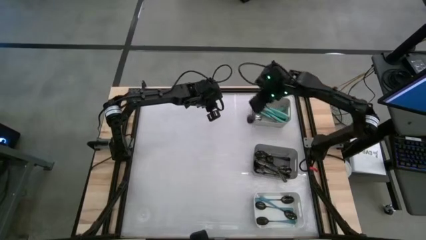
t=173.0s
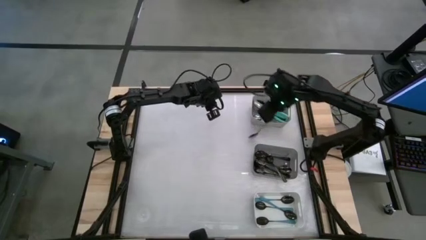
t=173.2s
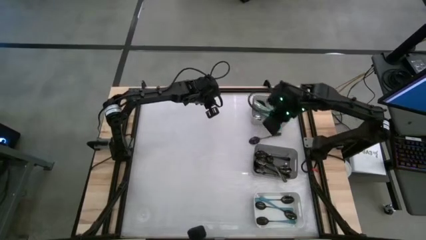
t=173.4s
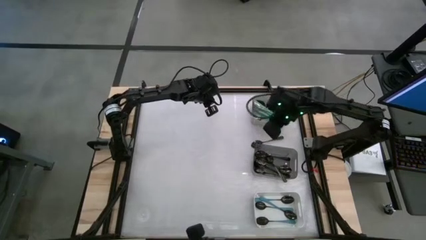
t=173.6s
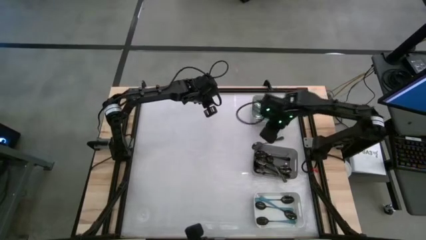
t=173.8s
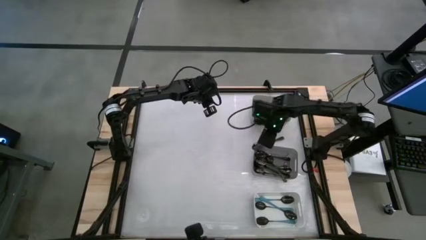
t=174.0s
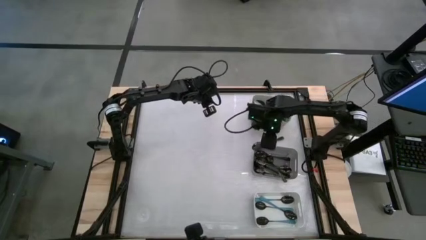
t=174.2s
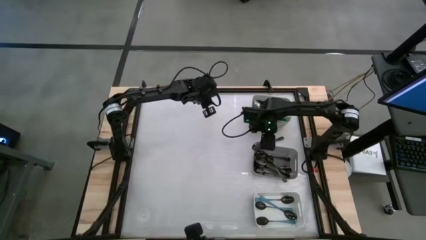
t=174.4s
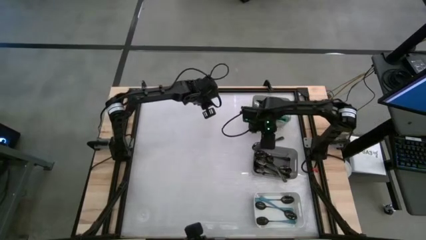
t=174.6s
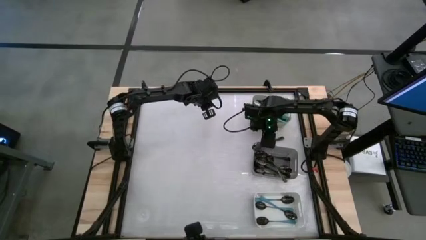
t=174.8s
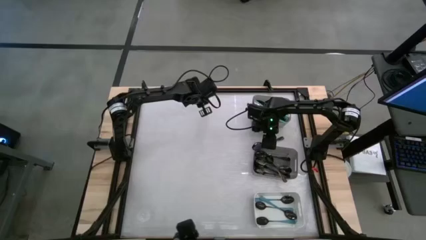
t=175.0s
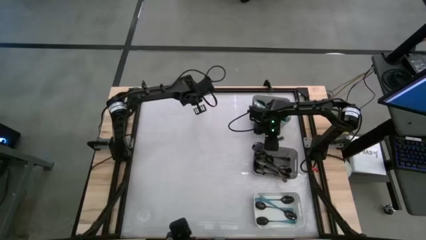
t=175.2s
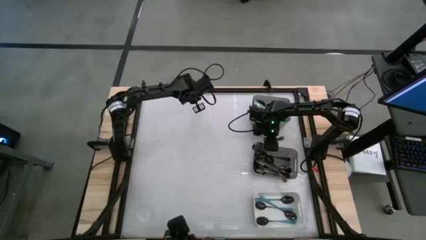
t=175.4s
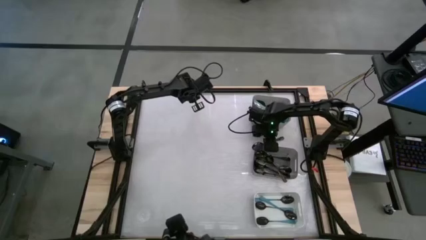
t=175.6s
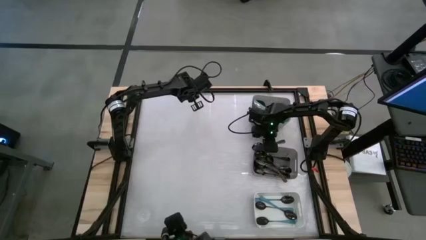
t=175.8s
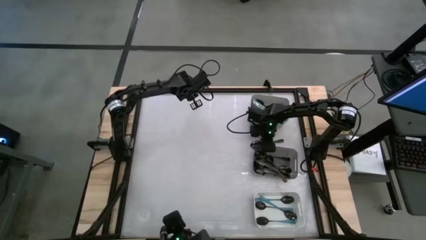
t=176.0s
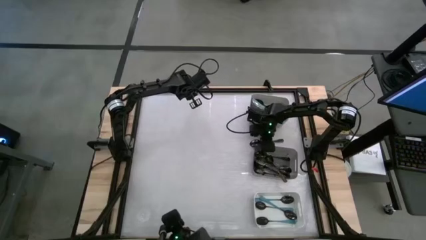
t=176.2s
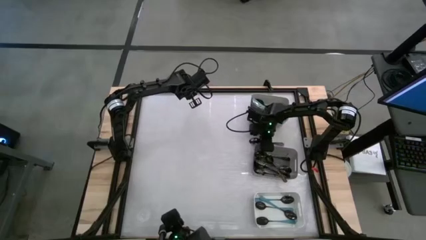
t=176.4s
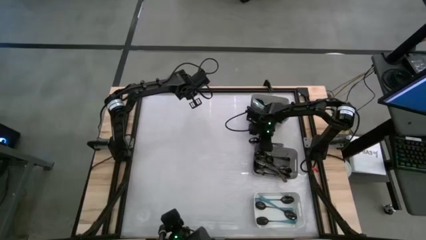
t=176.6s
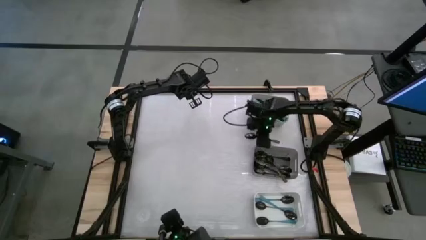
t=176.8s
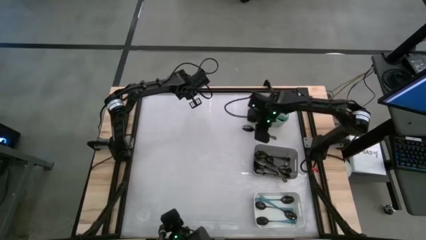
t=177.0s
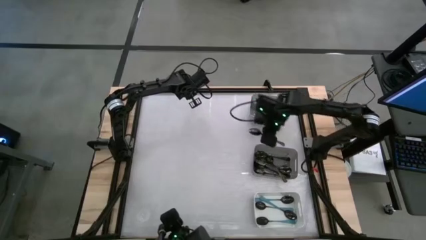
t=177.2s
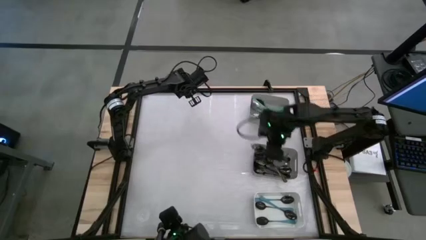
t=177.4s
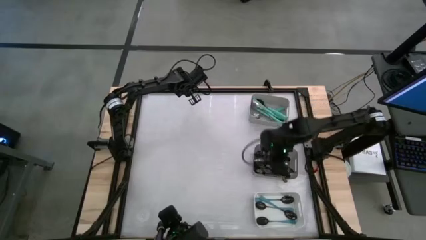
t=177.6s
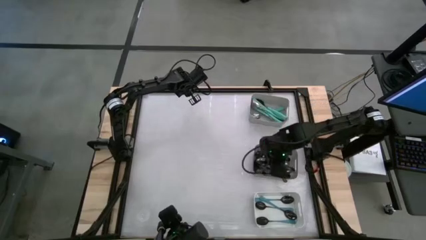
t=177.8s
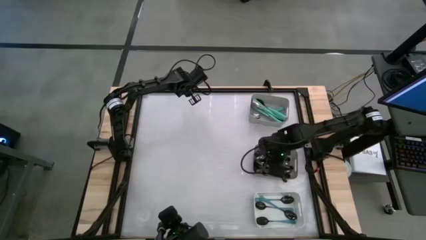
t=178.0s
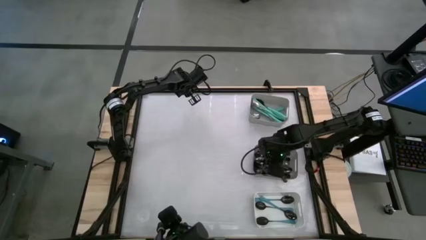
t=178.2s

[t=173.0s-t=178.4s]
Task: Sort silverware by color (type)
Put the black spoon into the black bin

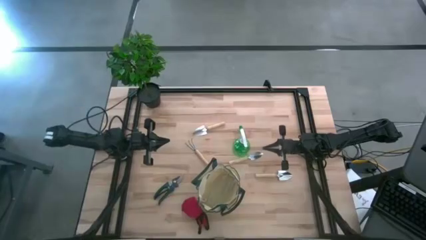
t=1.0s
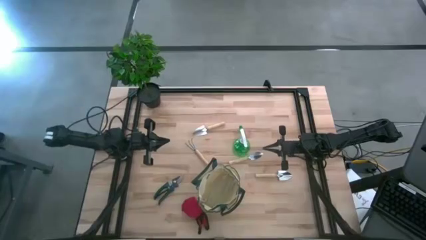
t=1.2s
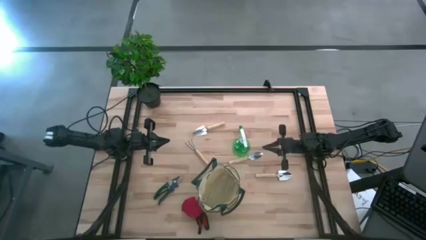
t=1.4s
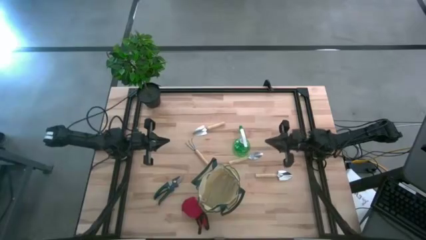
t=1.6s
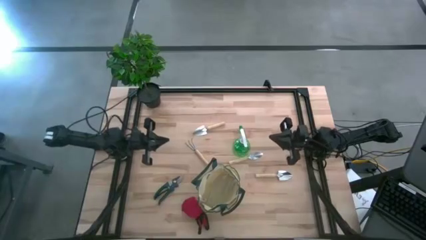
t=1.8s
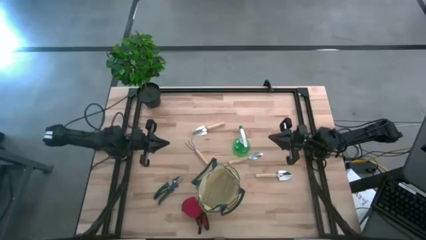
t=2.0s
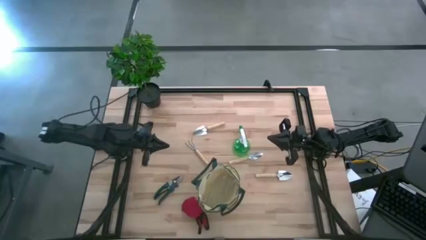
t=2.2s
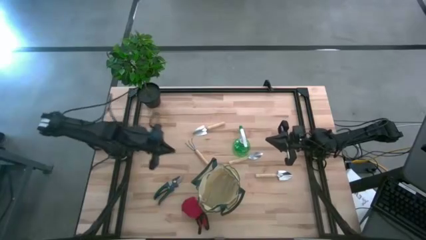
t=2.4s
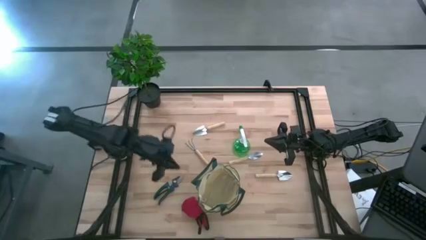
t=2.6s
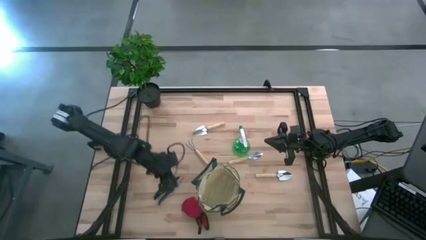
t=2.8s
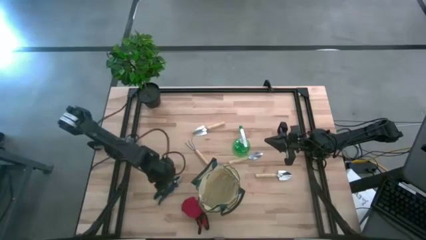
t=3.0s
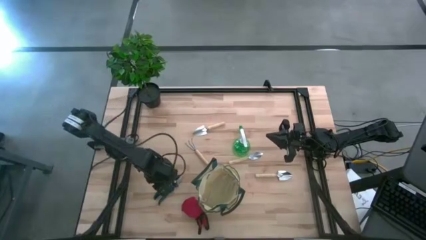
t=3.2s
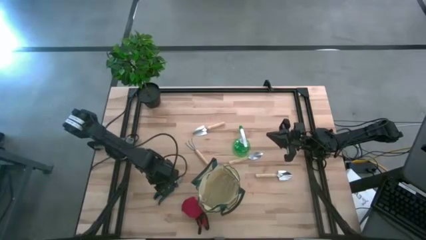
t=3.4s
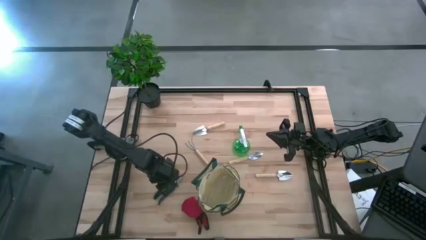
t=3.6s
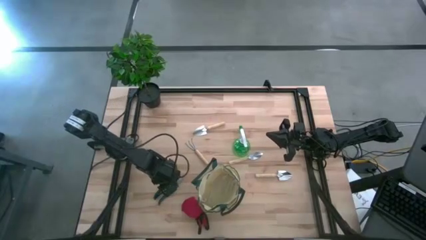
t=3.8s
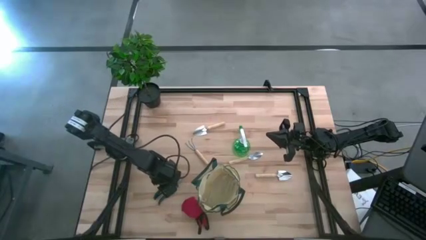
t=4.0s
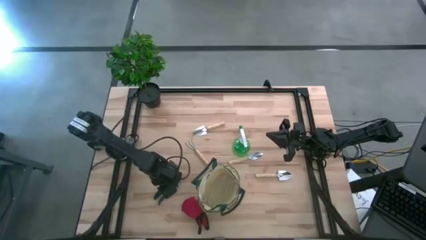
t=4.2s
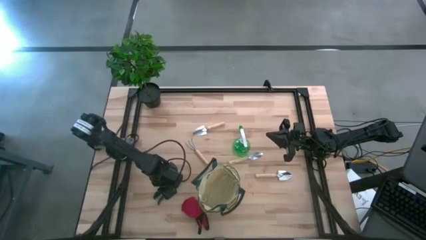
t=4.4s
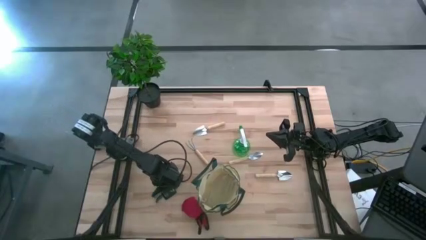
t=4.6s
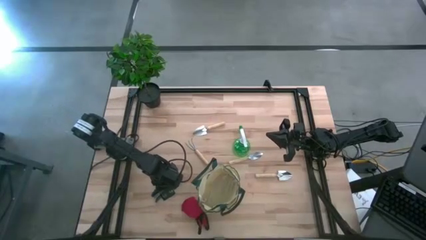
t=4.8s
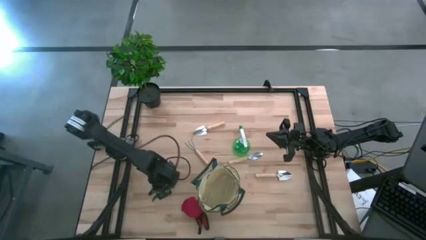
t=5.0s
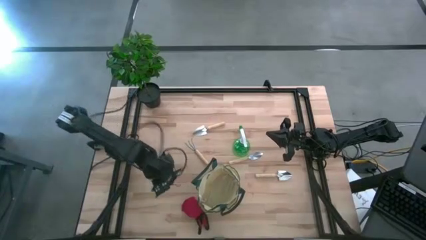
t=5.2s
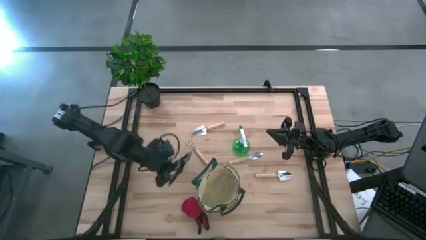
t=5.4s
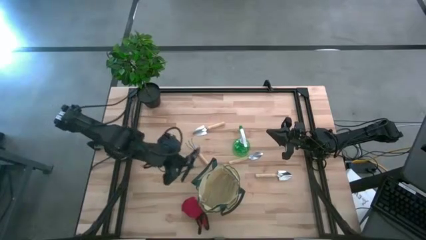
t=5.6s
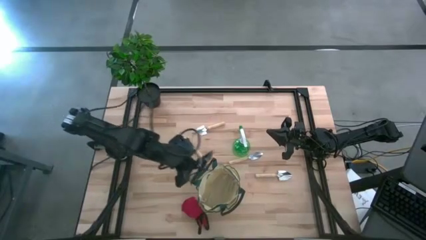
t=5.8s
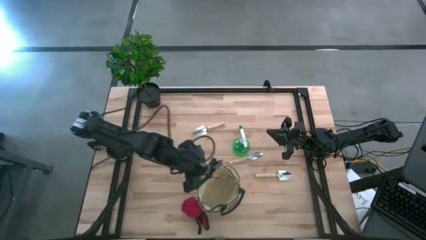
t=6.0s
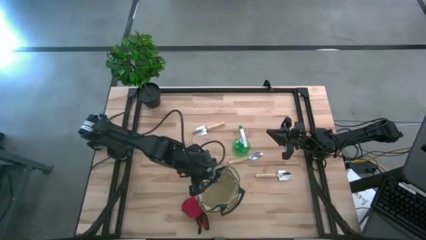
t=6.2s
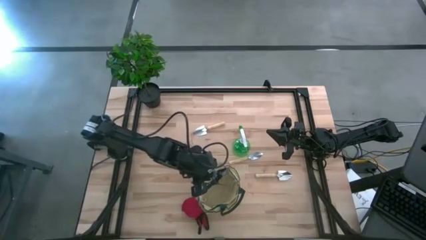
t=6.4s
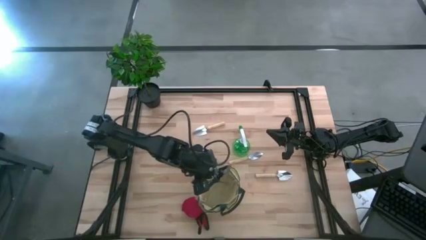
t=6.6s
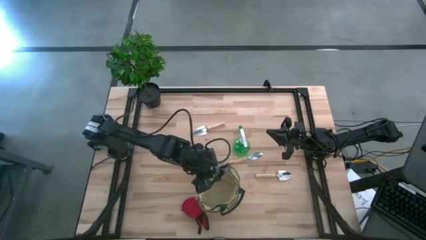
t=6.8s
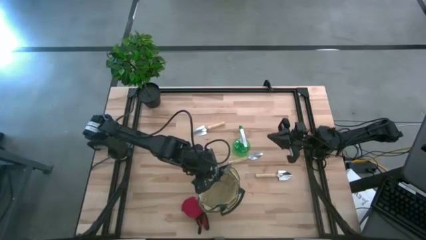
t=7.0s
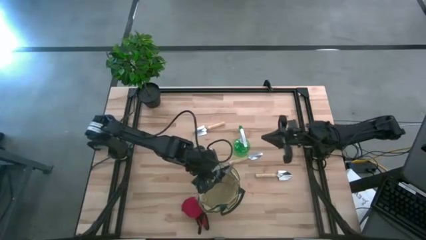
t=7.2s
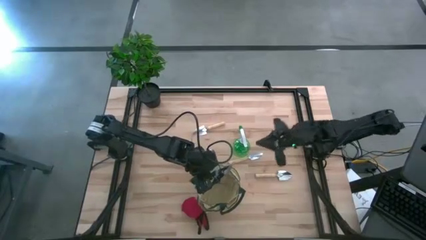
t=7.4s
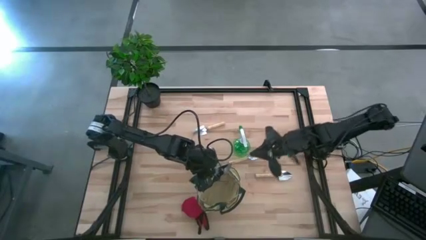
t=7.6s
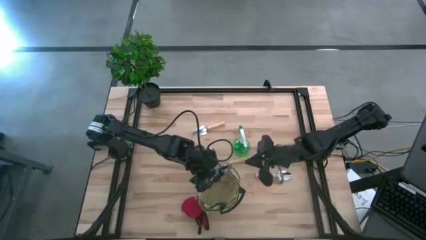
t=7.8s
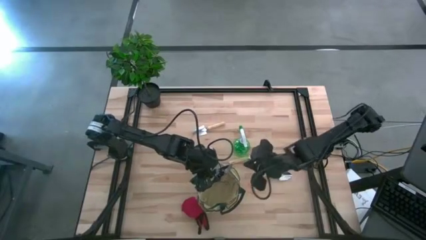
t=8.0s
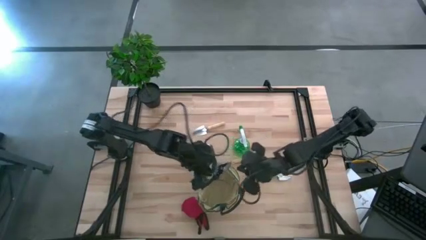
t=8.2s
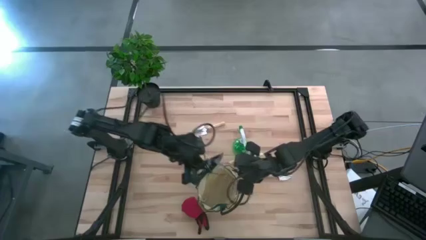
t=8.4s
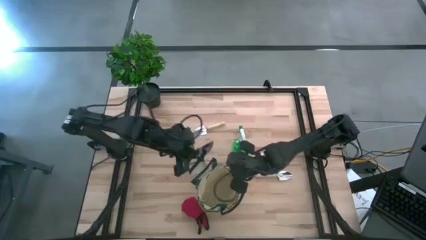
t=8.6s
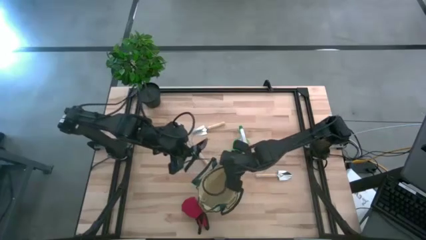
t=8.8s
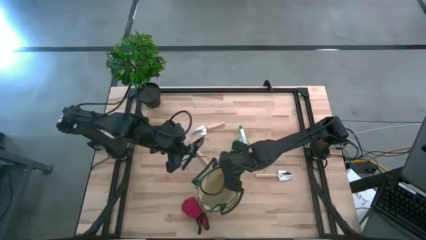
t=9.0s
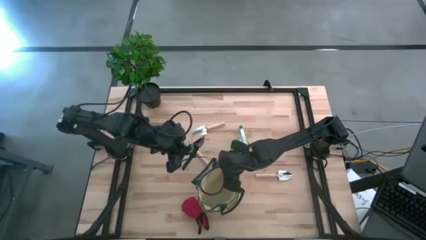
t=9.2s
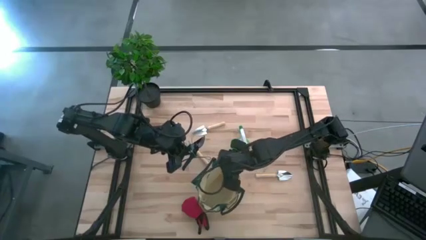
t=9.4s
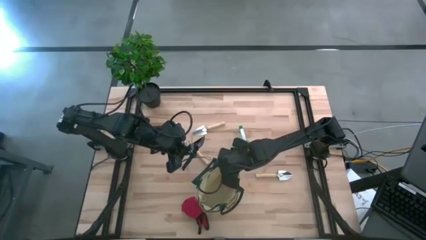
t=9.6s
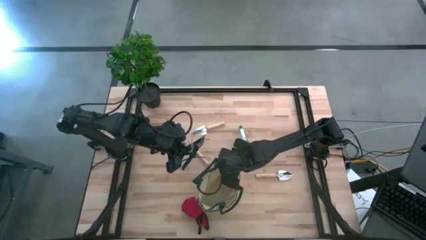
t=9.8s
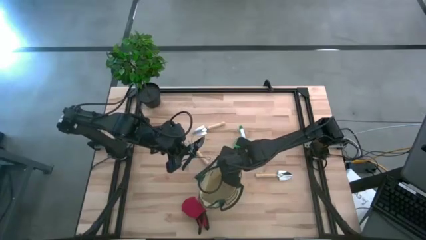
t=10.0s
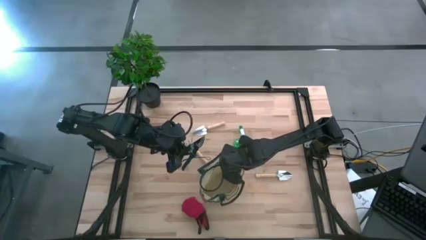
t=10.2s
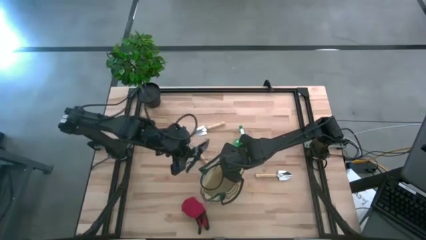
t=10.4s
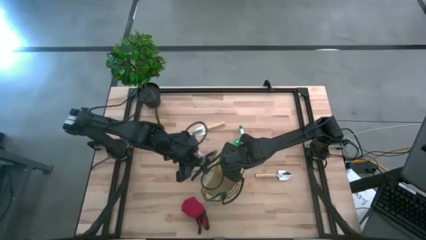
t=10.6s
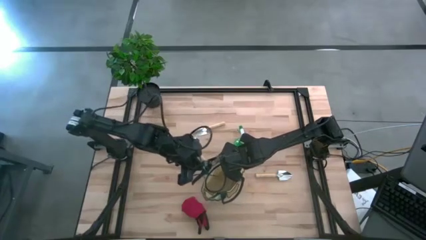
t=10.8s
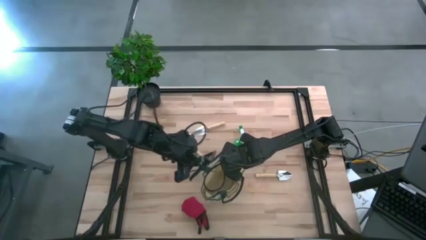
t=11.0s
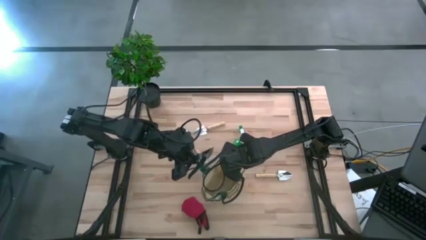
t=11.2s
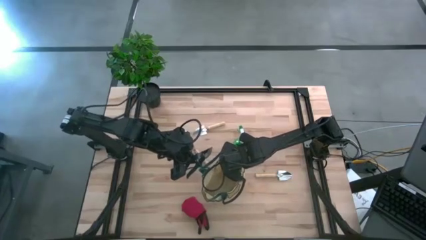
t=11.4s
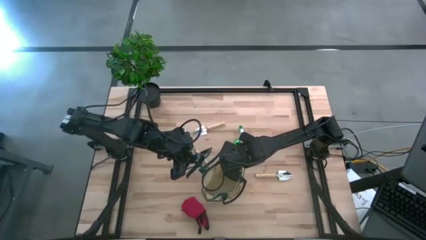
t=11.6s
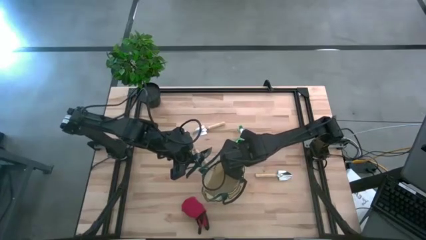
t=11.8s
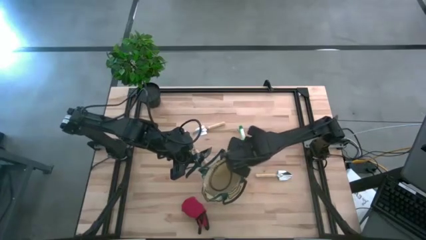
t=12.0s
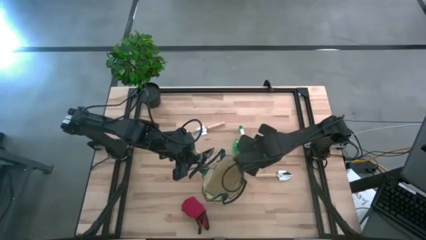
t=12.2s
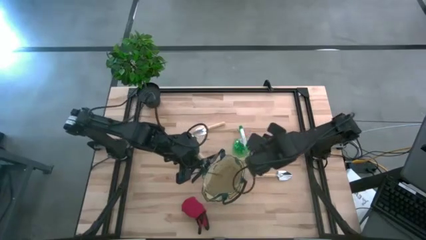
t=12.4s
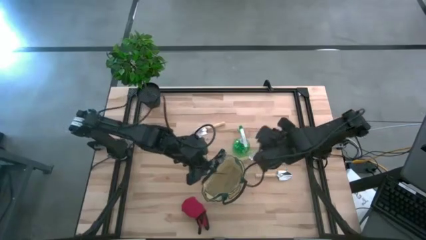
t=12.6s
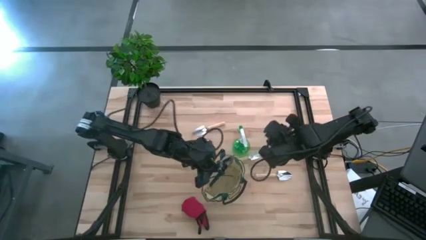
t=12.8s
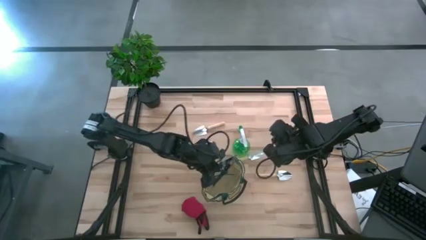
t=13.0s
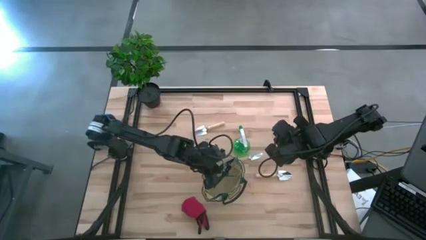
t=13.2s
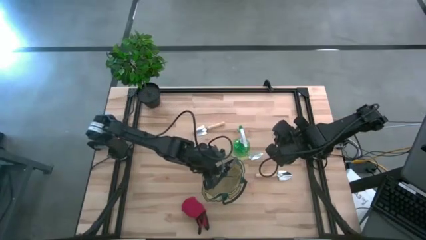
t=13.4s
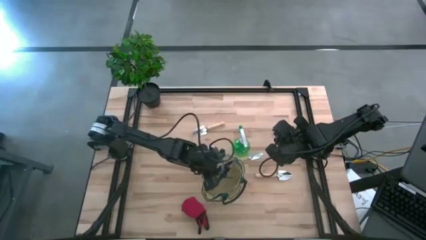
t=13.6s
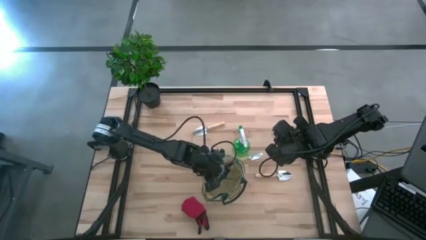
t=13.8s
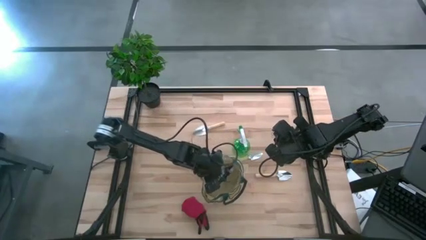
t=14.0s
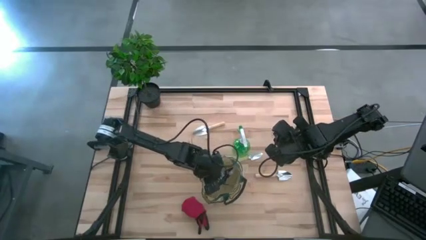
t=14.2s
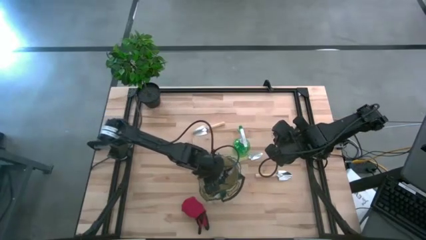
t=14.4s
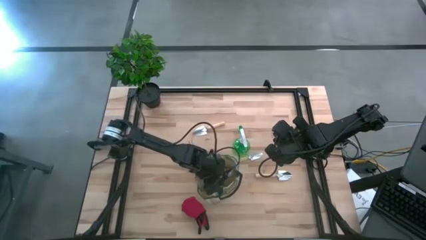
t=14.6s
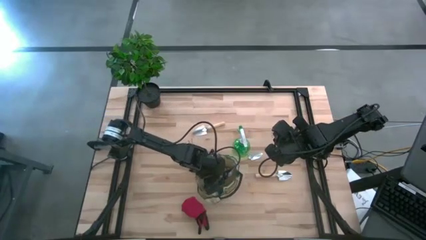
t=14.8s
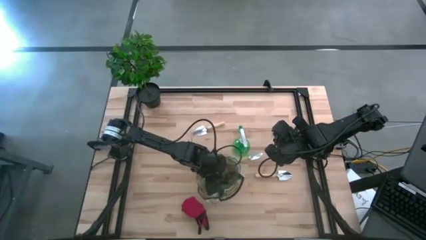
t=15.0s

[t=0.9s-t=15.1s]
Task: Pick & Place Garden tools in Gardening bag
Put the shear scissors into the gardening bag
